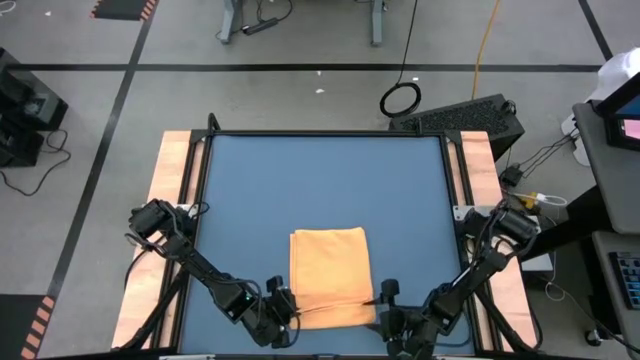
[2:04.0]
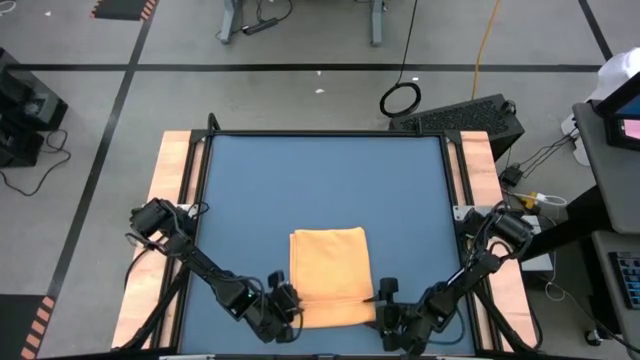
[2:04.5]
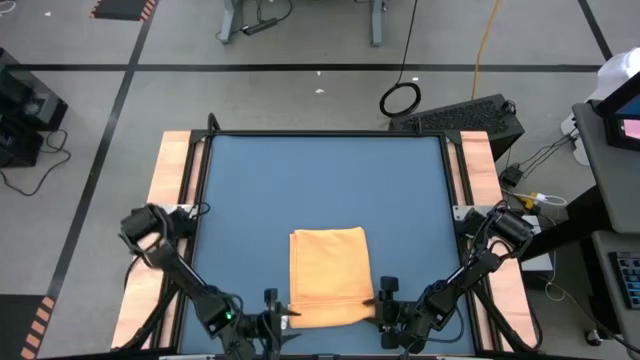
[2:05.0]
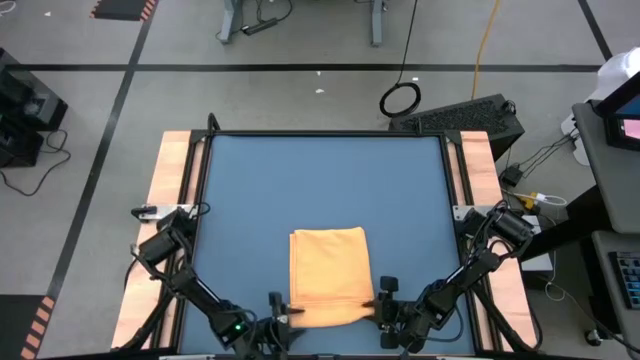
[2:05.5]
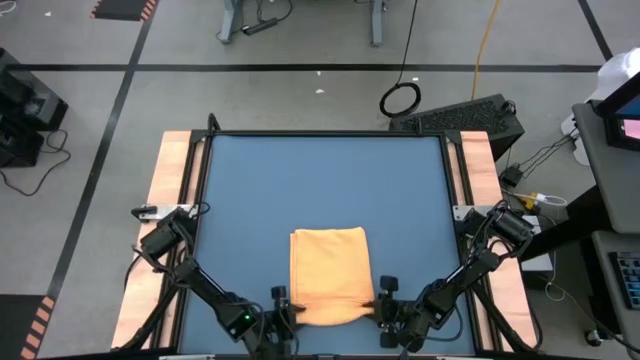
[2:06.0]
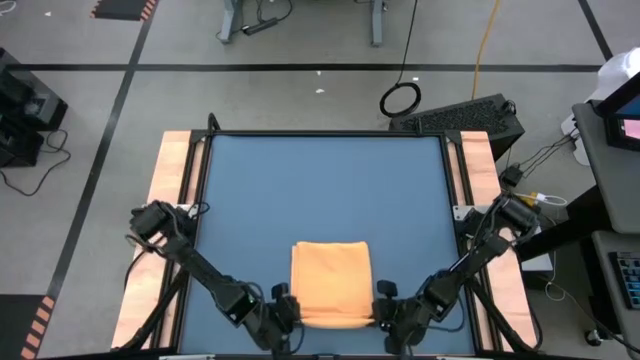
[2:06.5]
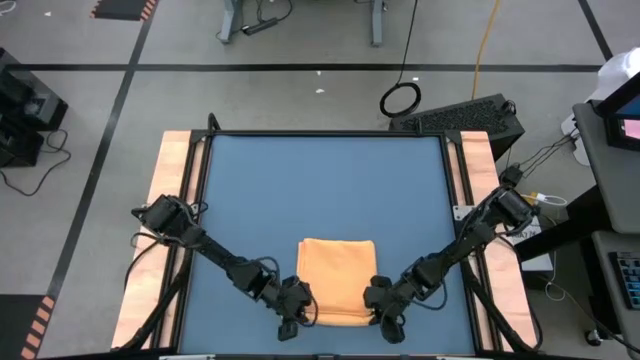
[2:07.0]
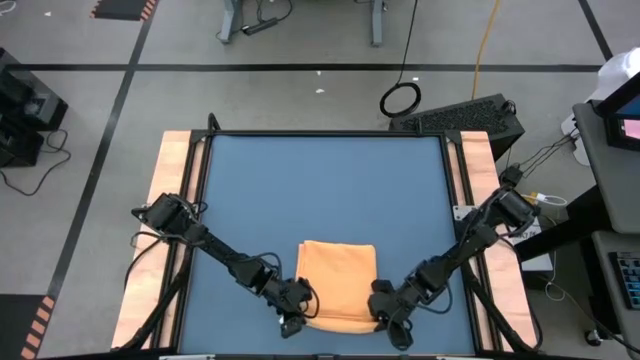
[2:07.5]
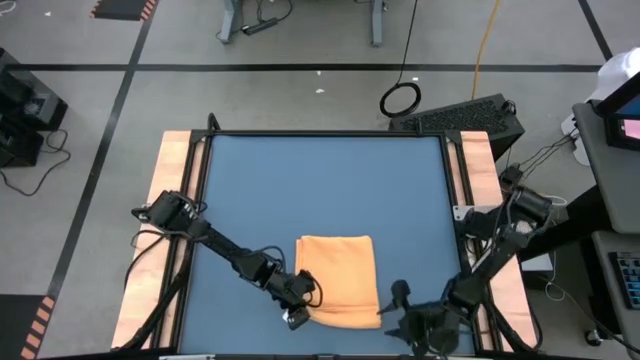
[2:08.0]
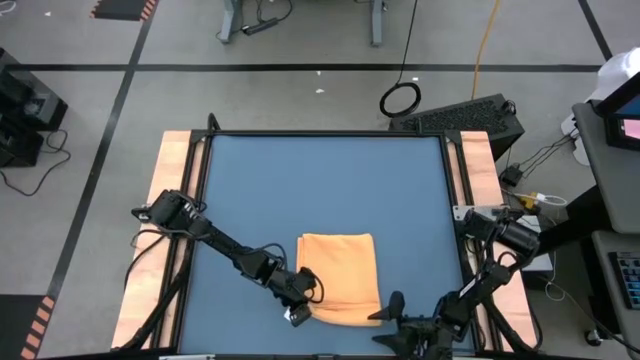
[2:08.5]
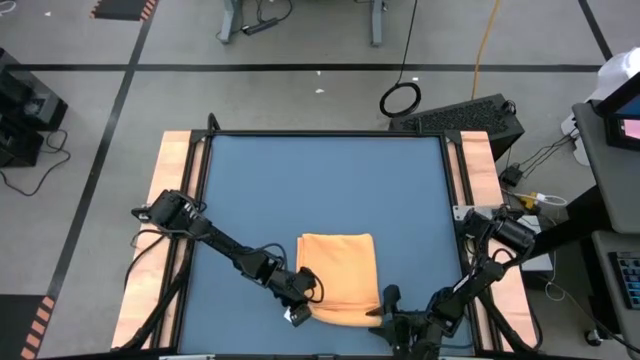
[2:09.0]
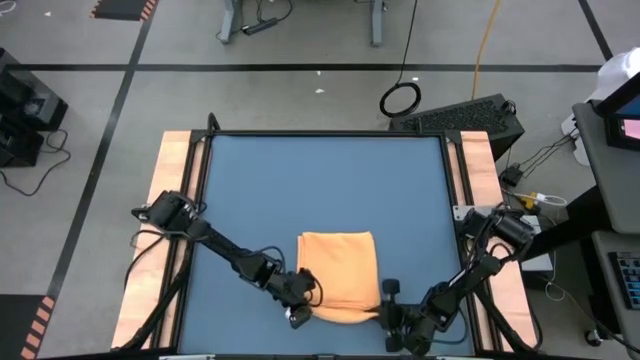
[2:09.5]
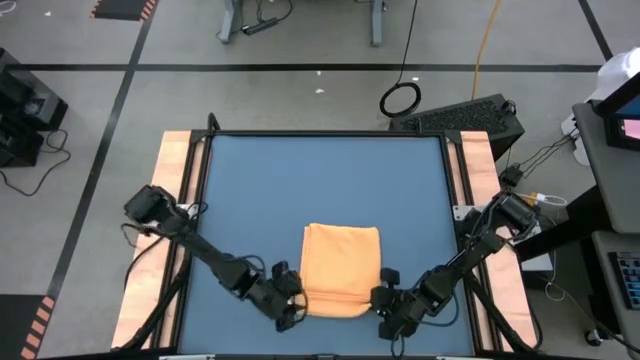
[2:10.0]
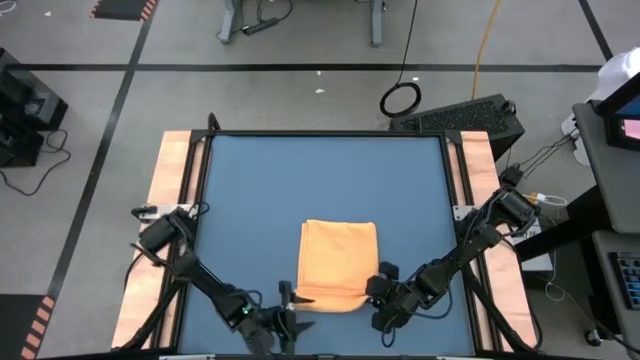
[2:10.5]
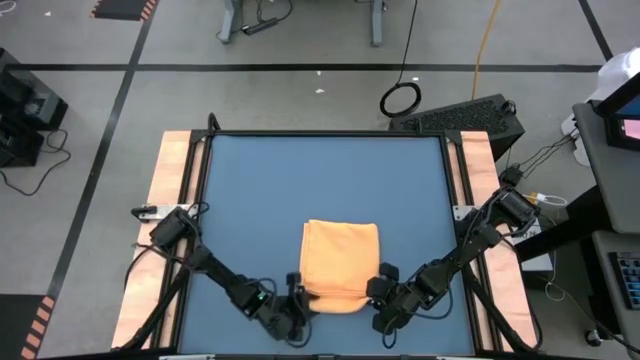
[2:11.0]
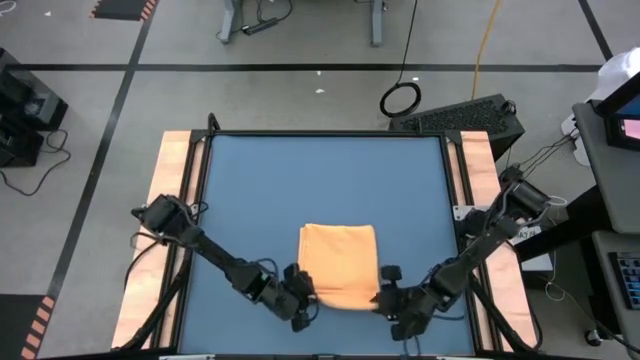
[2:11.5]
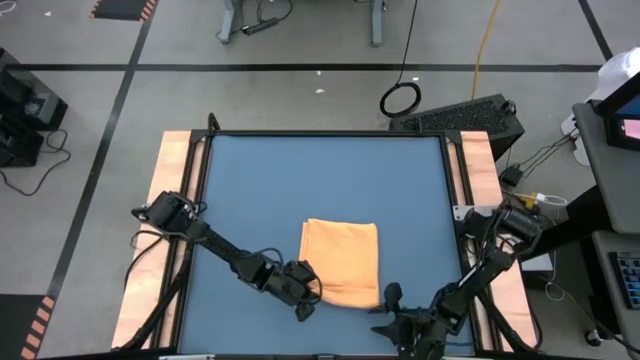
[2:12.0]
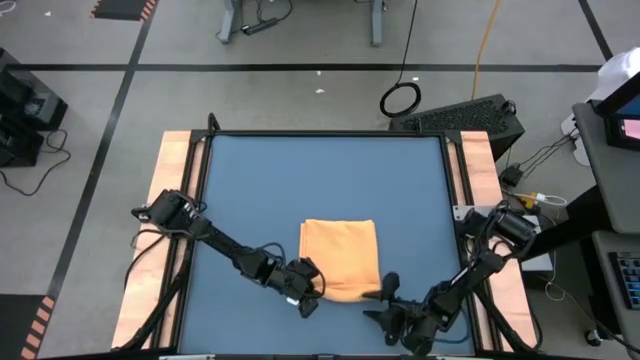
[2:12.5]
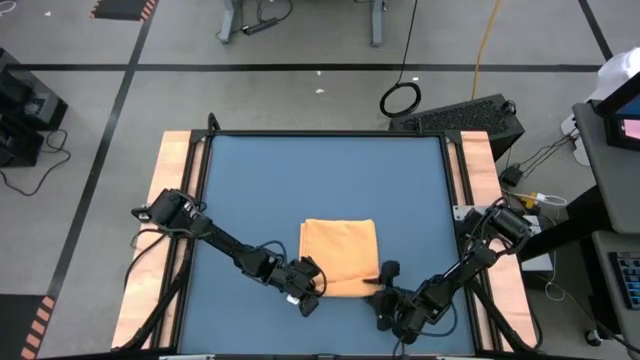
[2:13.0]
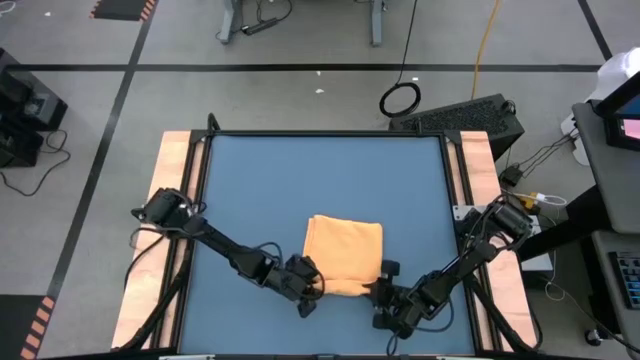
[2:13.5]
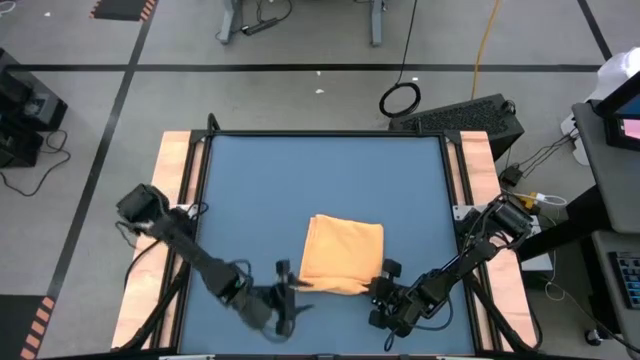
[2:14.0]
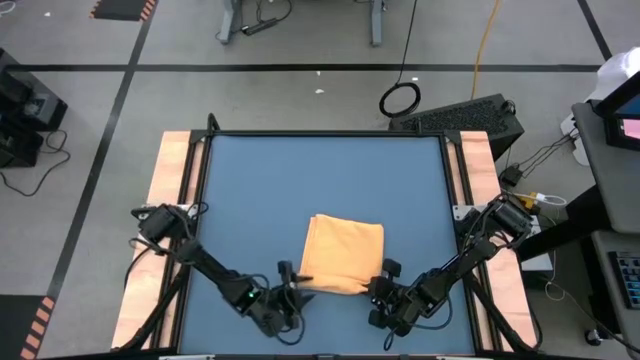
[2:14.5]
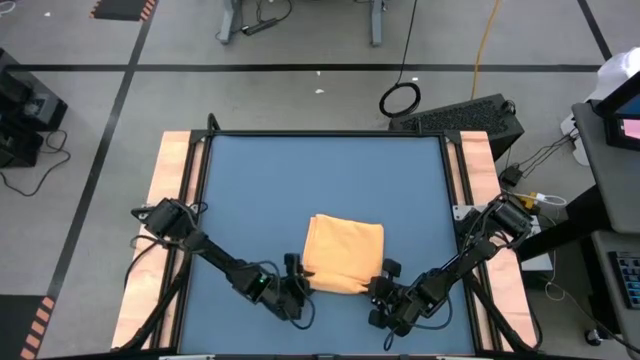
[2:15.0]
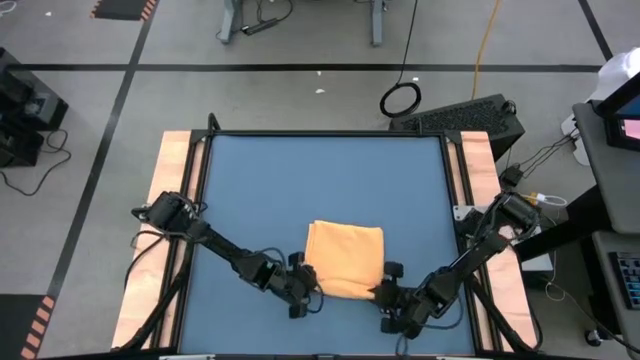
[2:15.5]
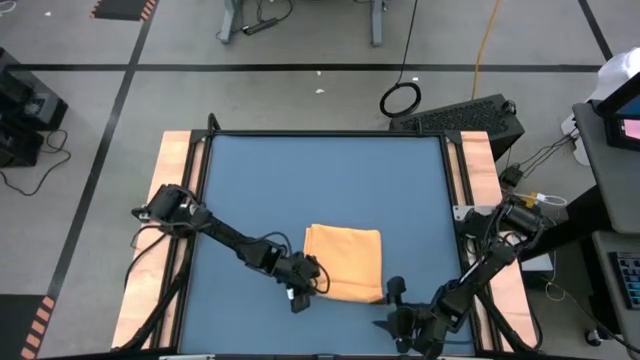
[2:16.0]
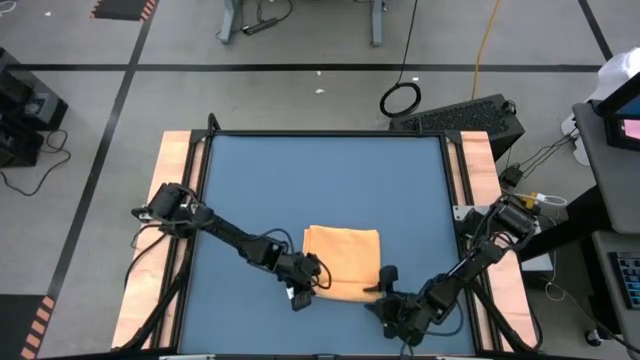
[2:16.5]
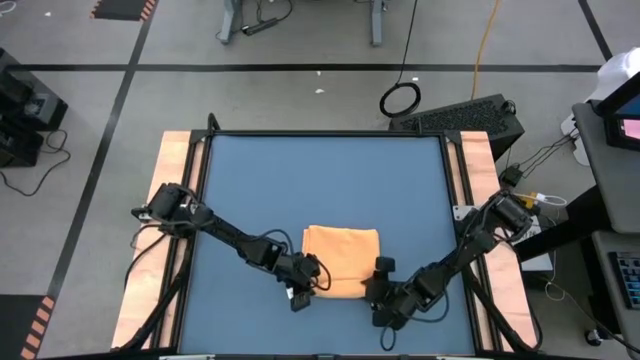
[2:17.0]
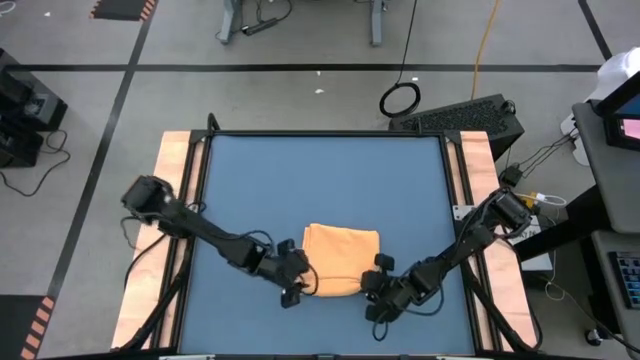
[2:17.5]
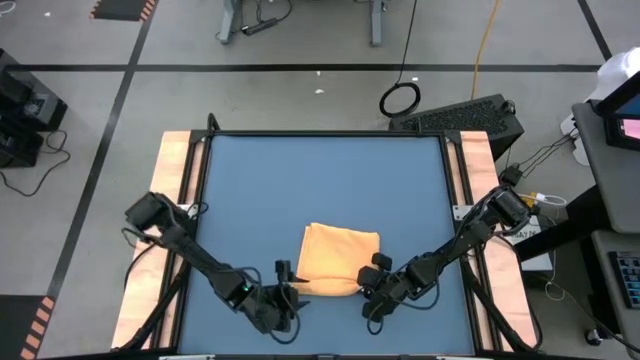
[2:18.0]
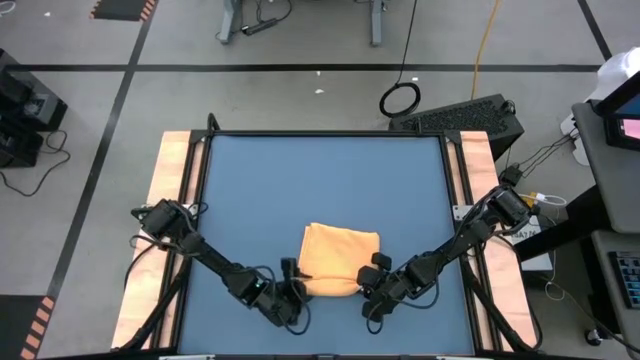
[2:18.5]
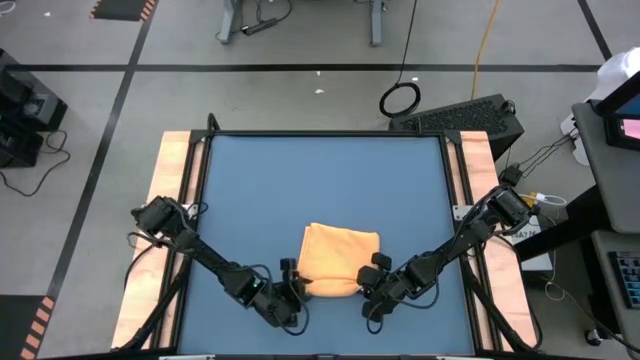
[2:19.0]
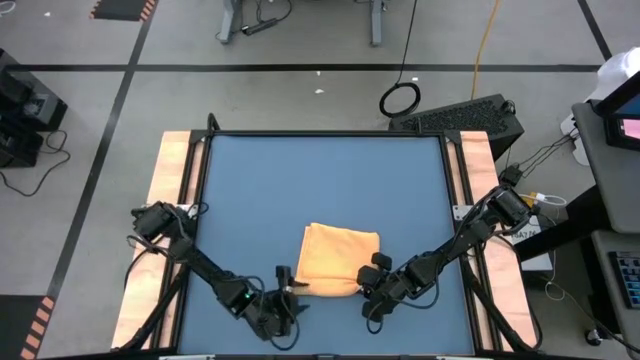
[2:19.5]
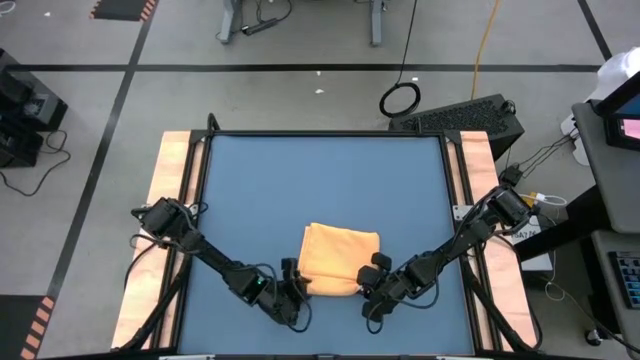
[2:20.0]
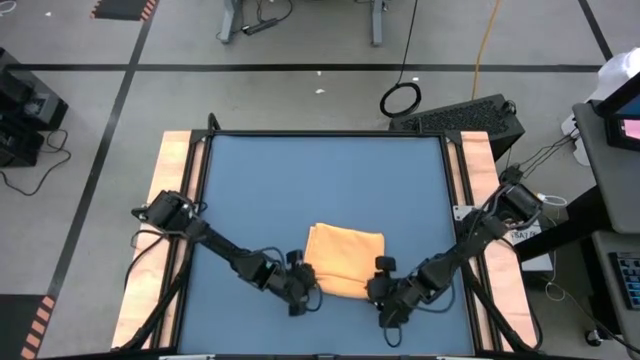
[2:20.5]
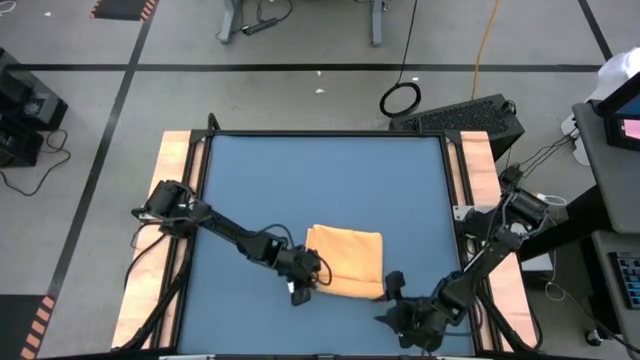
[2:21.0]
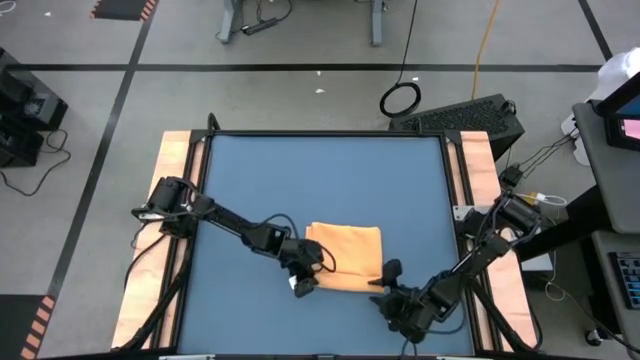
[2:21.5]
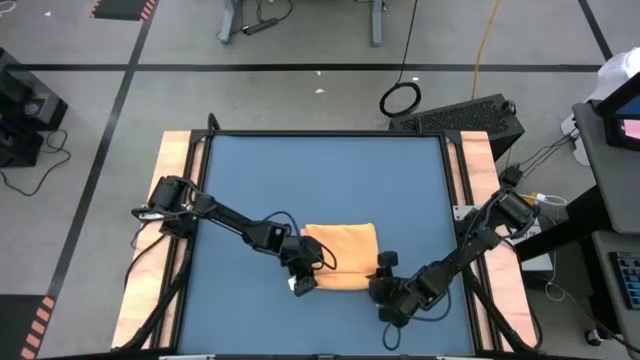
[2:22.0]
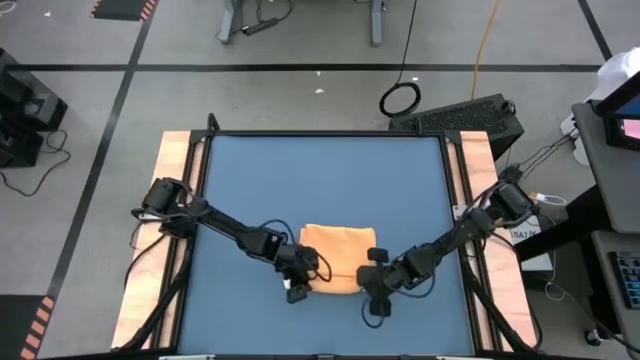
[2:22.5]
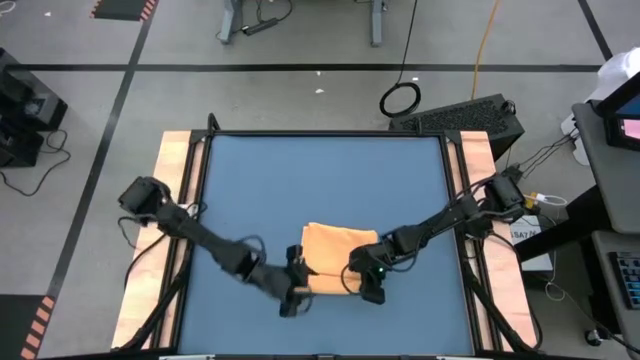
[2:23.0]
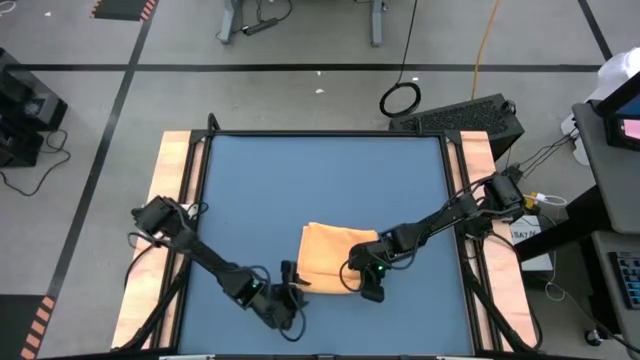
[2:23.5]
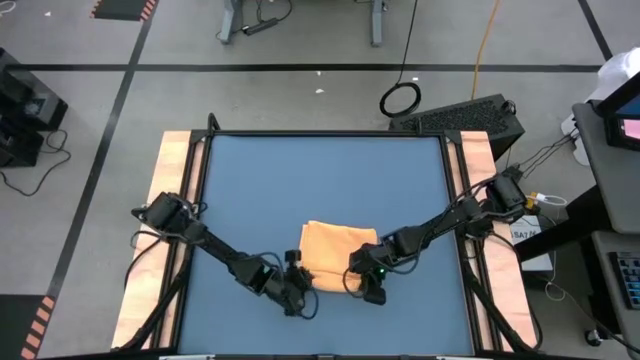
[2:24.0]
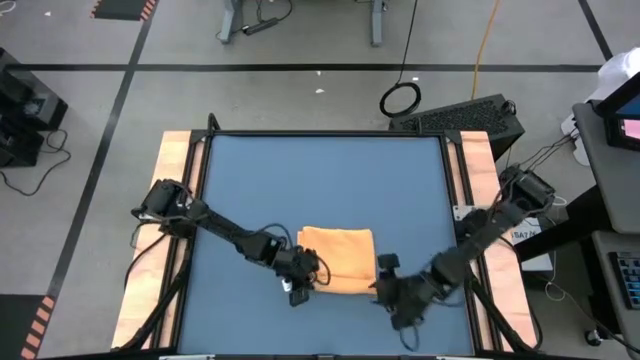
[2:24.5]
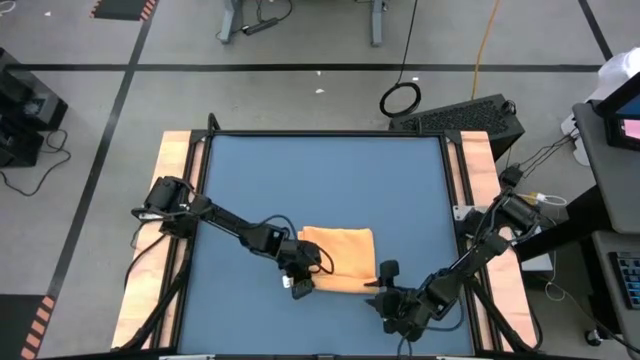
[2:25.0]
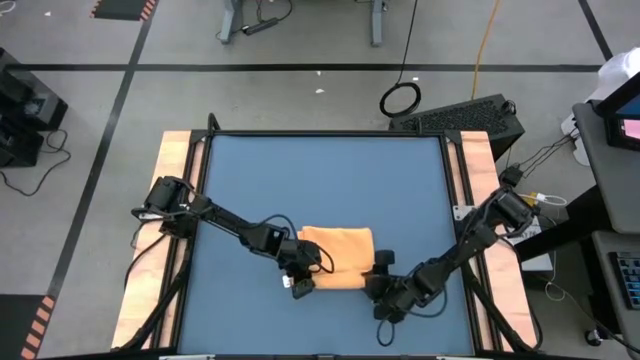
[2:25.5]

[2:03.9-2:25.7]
Task: Roll towel
Roll the yellow towel
